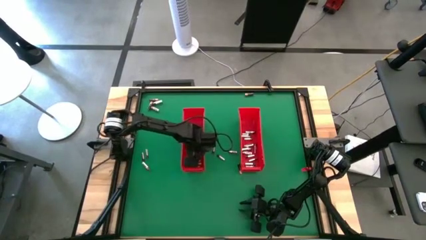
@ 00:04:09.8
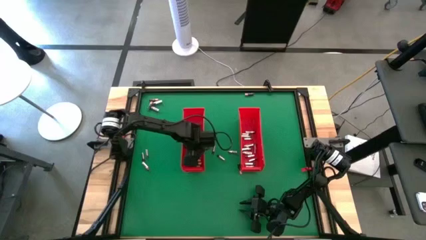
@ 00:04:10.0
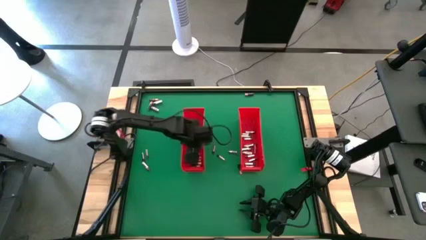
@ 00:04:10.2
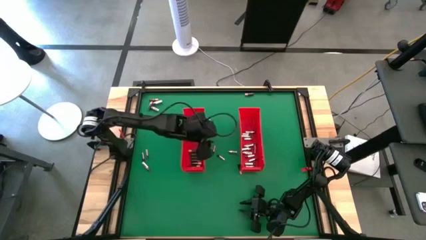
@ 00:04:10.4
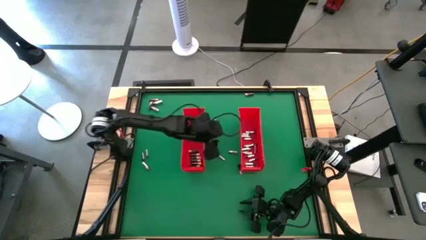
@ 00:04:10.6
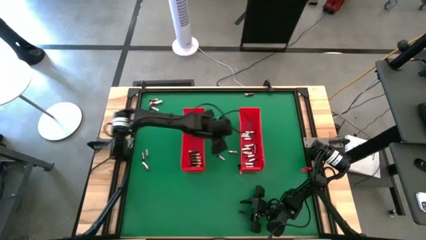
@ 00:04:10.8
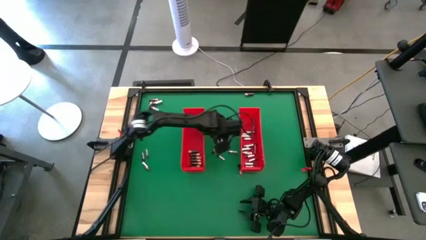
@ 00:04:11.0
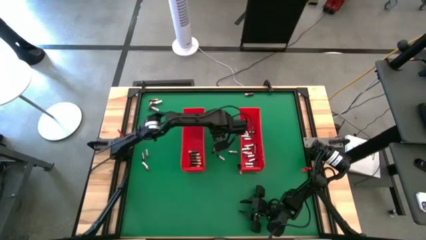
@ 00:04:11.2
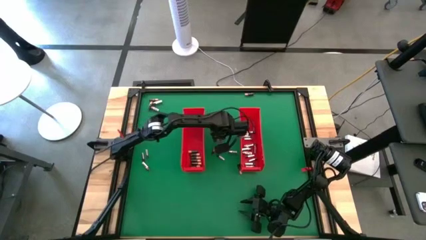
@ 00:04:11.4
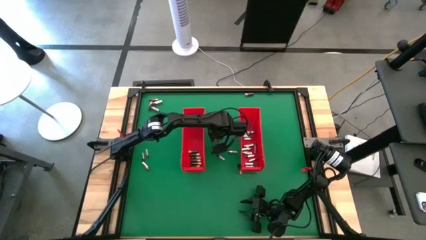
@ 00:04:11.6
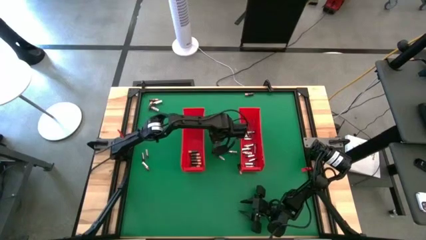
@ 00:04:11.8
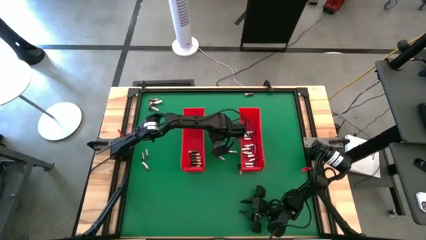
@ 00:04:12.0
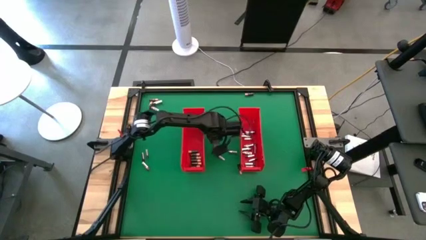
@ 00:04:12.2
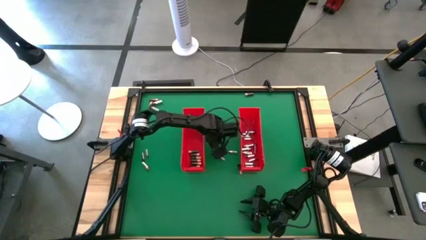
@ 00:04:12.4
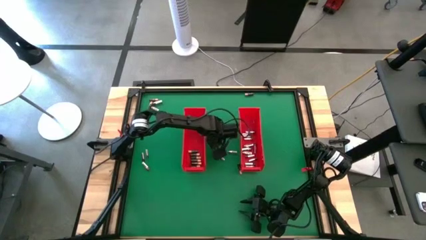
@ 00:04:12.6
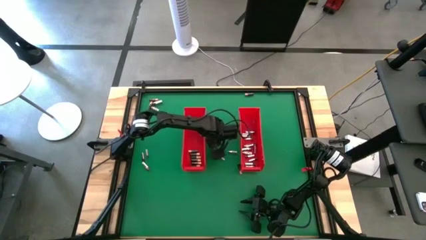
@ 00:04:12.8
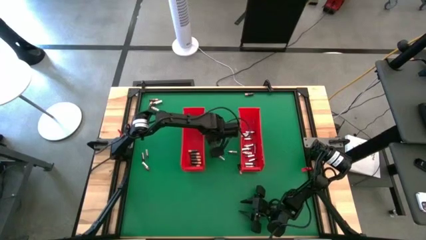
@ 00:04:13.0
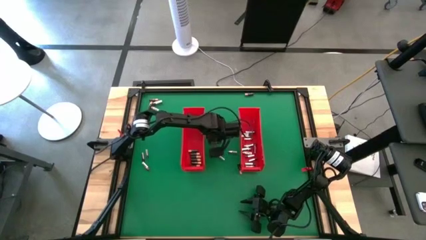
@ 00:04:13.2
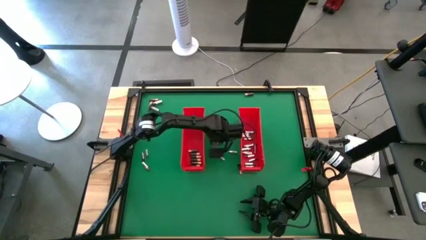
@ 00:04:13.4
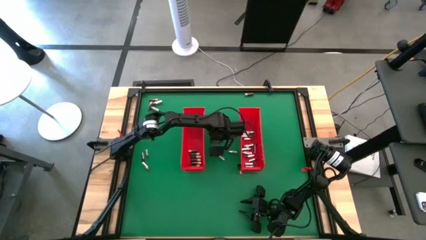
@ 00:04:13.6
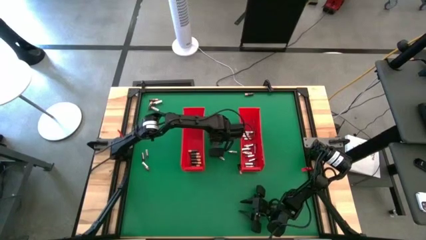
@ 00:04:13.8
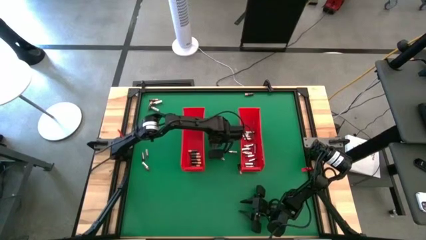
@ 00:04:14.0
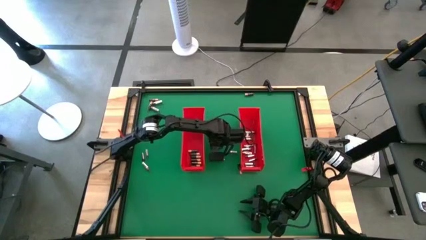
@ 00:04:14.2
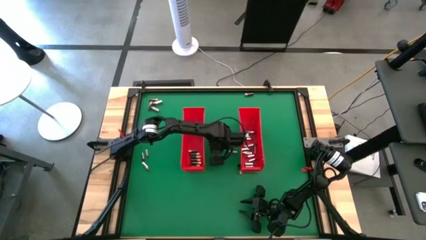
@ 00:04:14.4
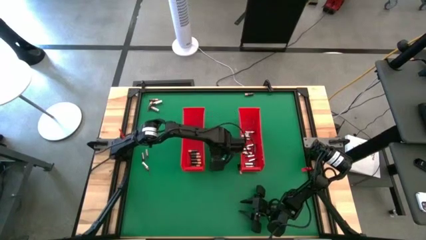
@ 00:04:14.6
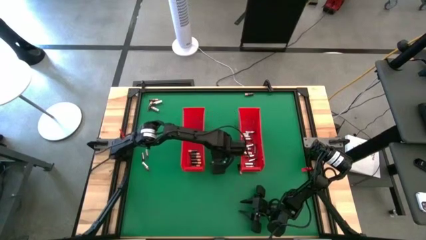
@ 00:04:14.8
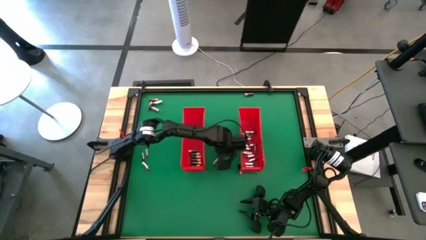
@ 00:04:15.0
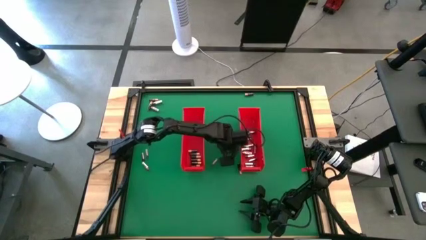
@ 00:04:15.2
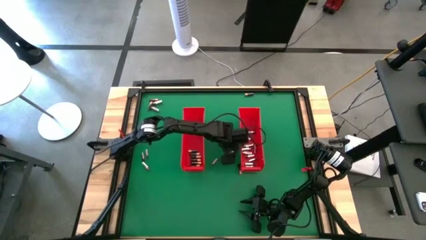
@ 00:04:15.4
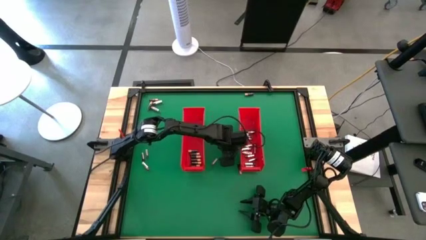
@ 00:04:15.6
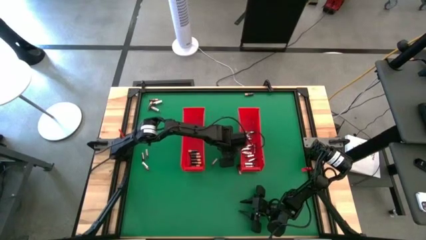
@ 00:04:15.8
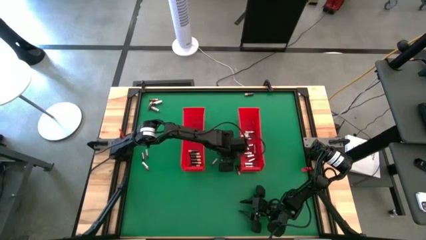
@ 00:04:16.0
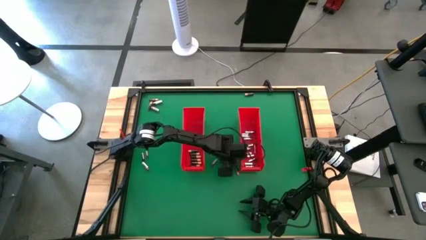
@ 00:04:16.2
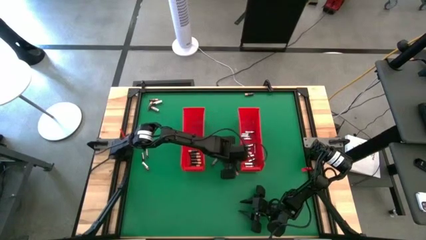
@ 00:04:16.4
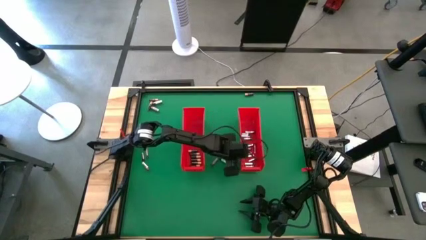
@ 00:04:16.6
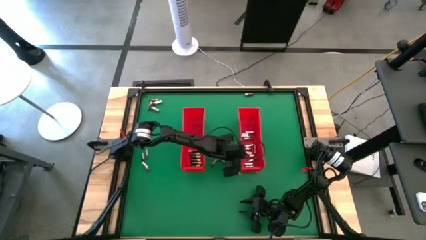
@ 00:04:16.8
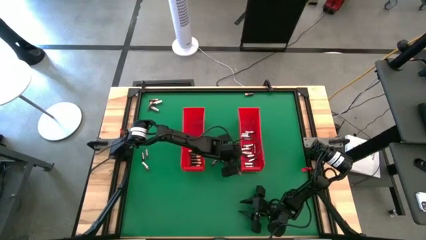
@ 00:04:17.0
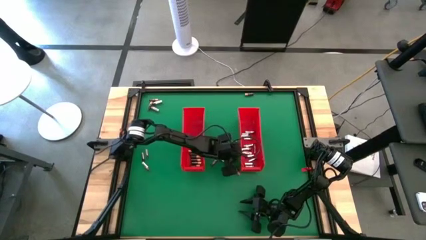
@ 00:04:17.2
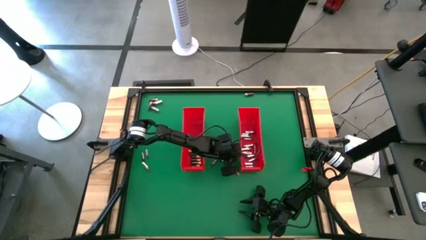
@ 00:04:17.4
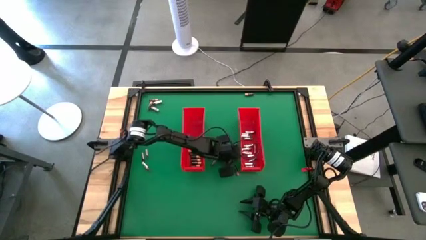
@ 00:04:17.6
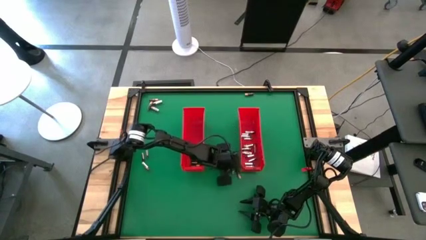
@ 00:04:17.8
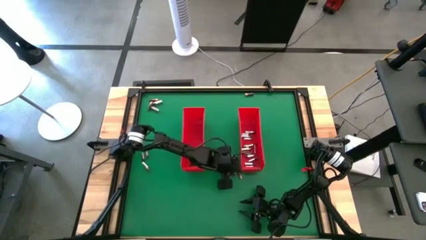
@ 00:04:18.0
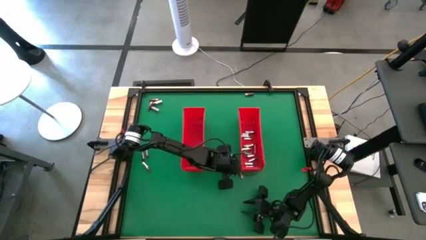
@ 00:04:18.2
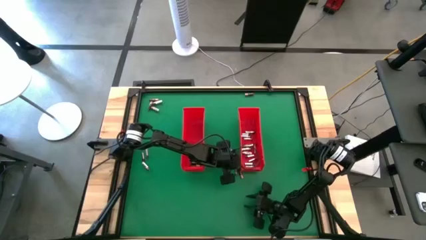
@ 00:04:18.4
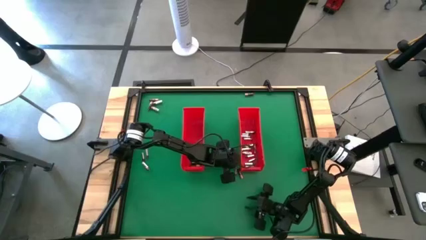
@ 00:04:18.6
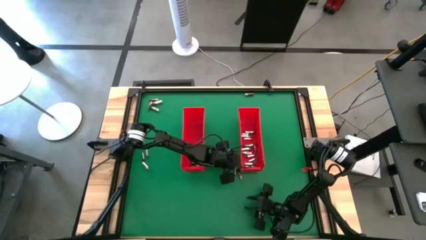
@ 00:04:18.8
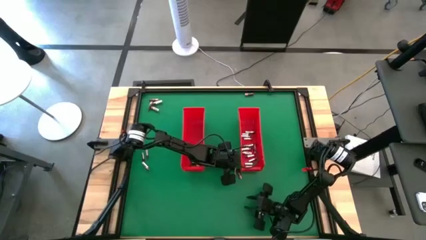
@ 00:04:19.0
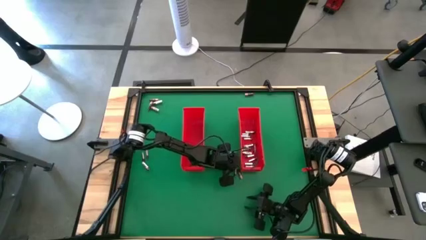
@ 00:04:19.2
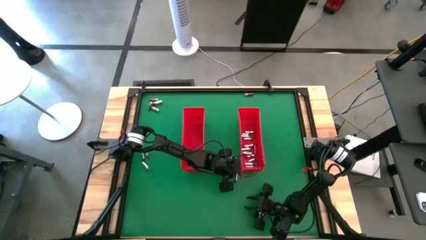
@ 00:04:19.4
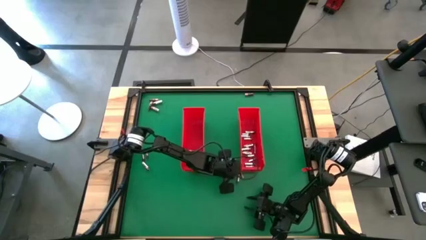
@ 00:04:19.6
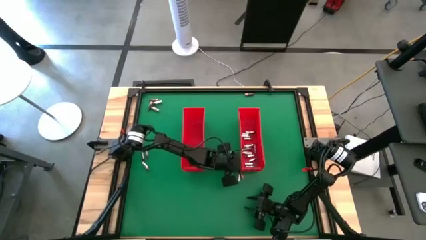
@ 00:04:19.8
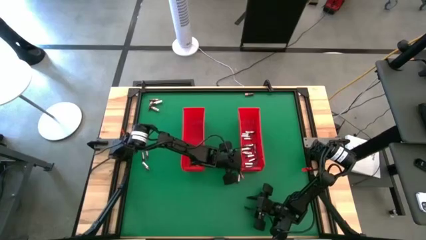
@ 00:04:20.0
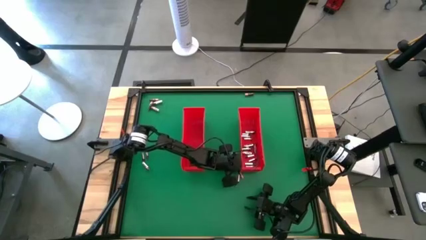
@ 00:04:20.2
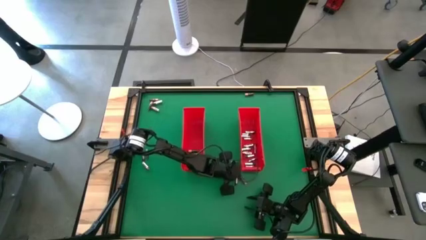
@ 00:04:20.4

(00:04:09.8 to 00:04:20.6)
Task: Sort batteries
Adjust the batteries on the table
